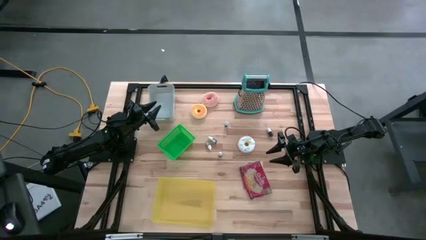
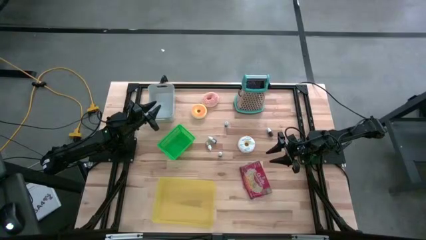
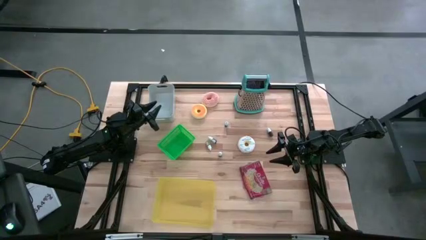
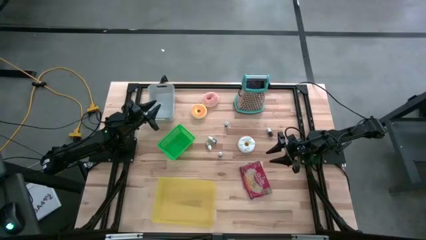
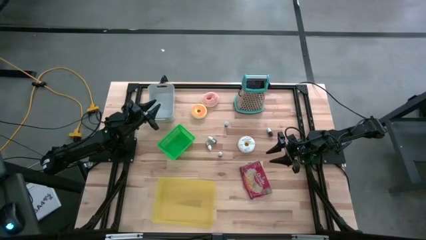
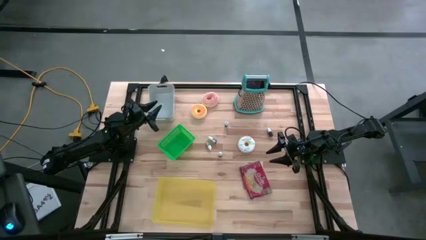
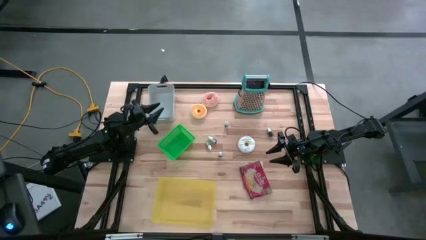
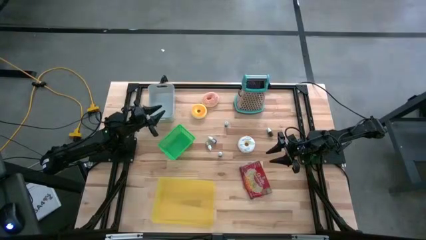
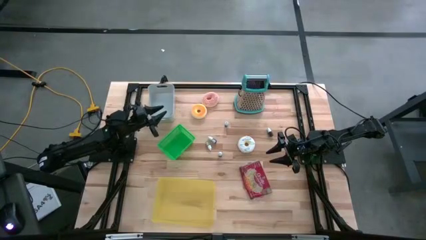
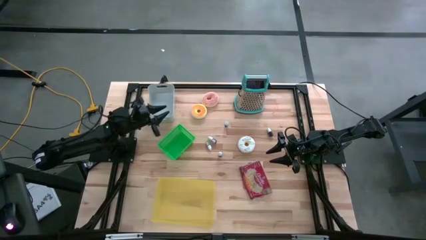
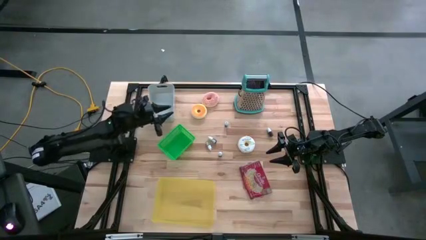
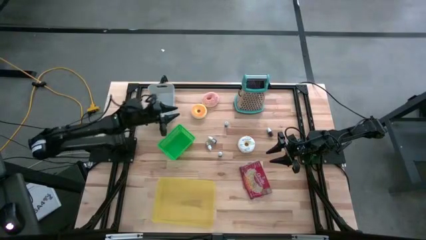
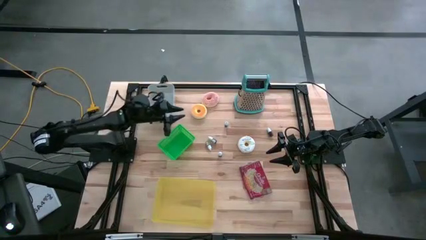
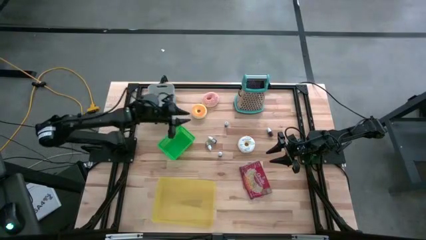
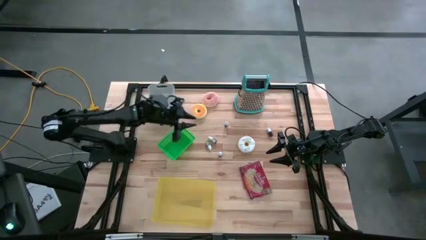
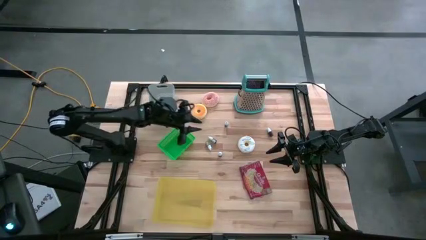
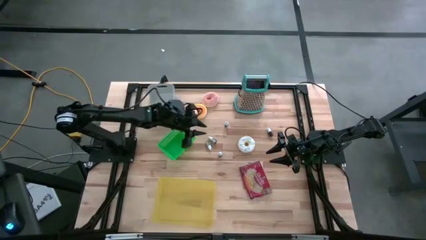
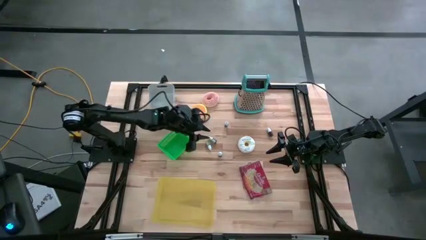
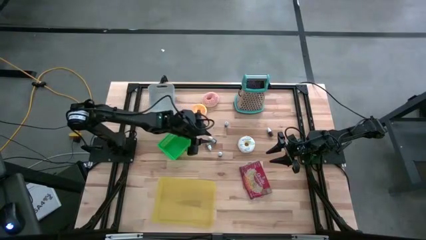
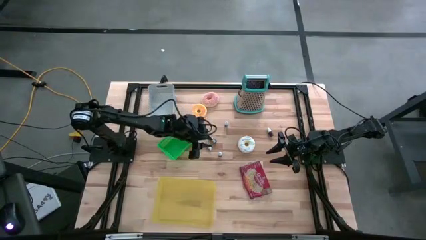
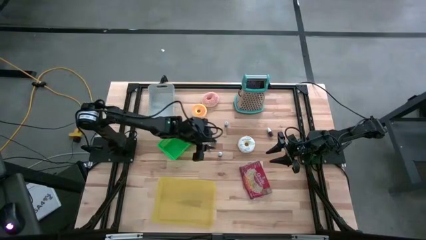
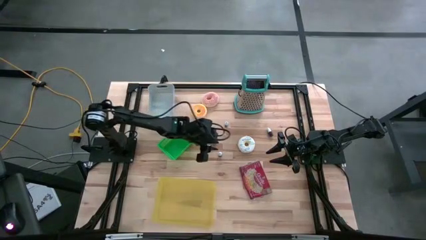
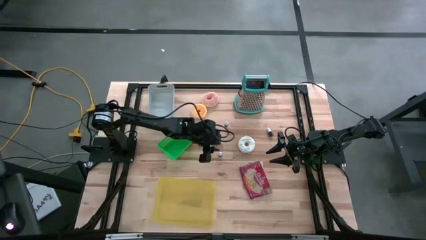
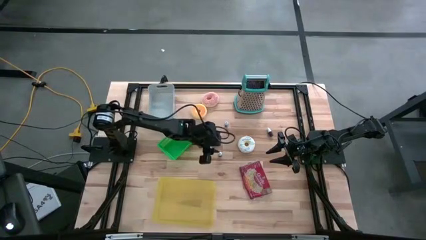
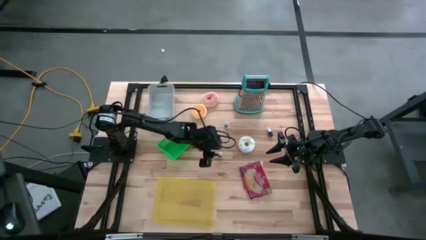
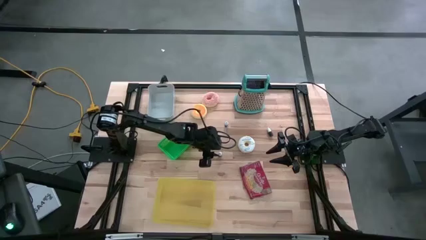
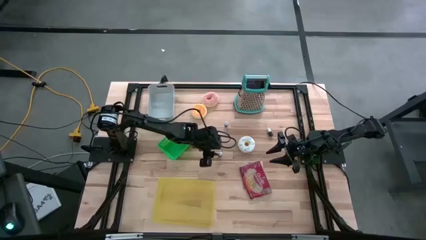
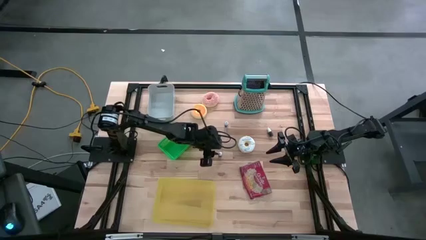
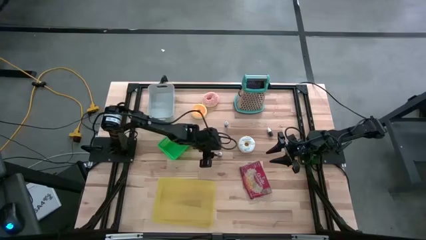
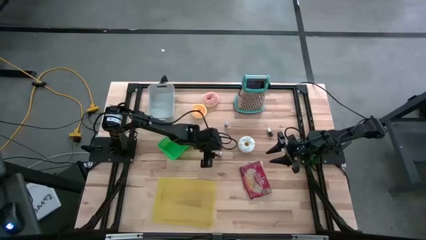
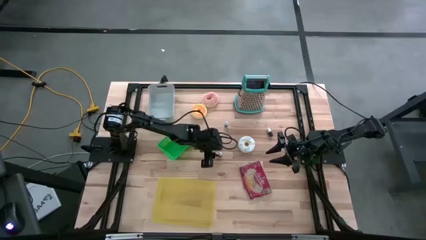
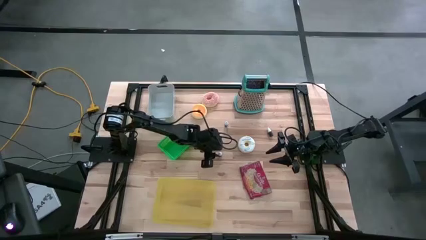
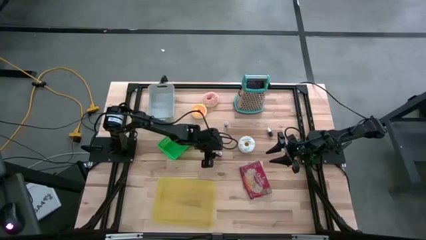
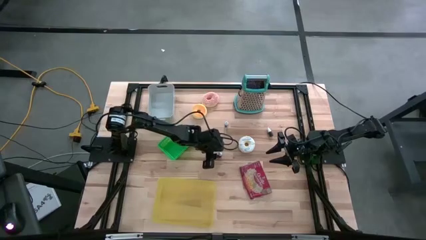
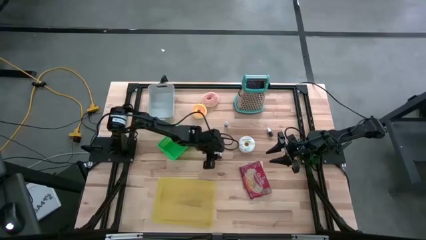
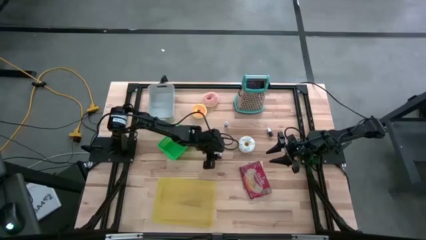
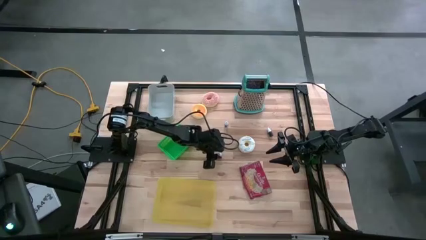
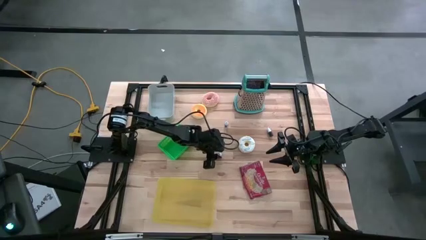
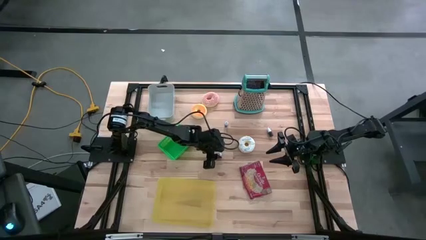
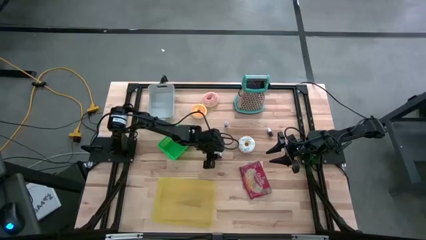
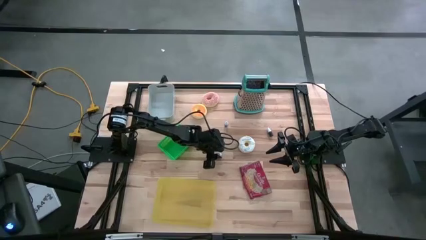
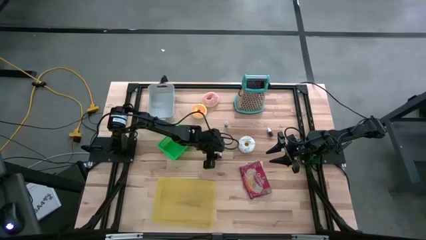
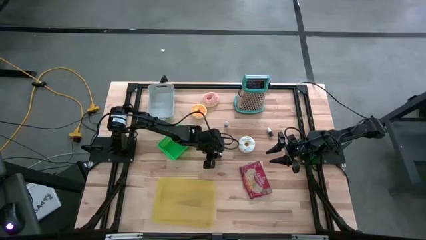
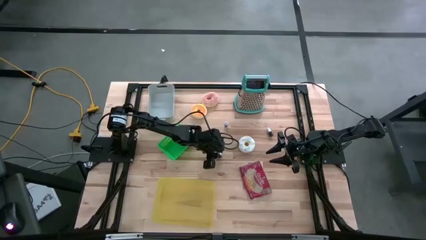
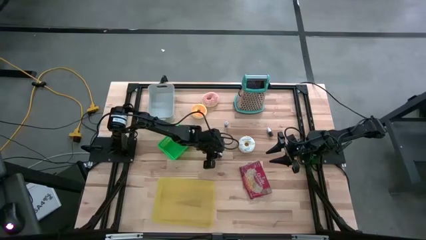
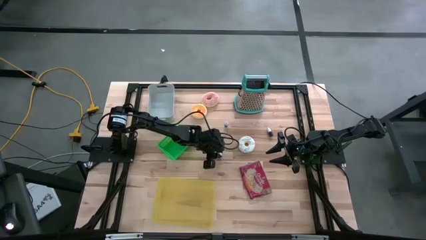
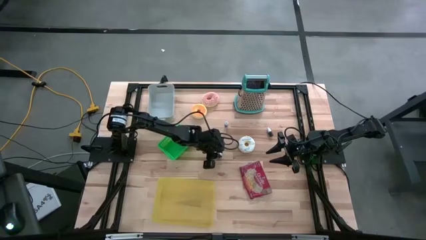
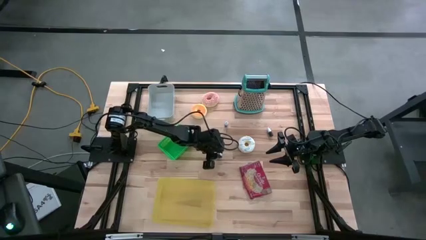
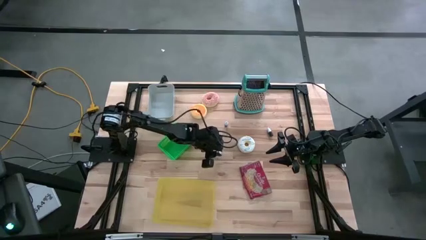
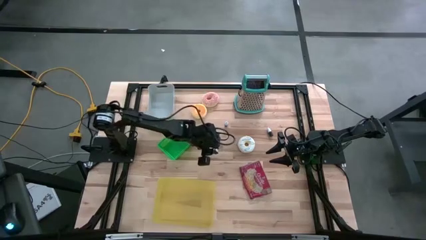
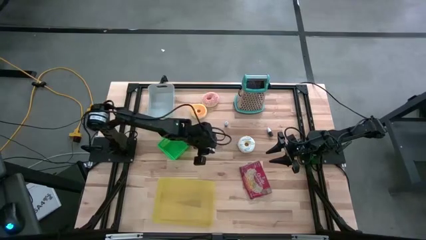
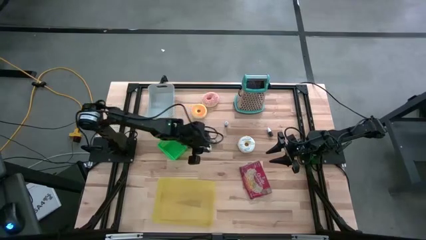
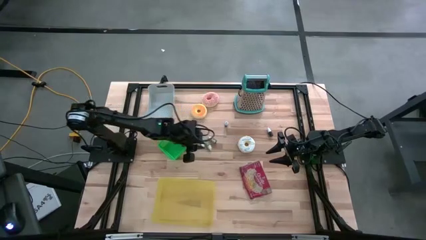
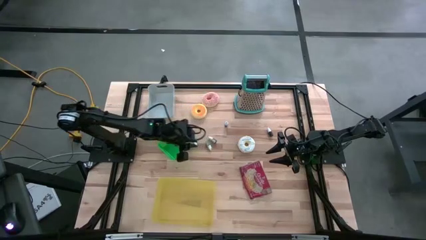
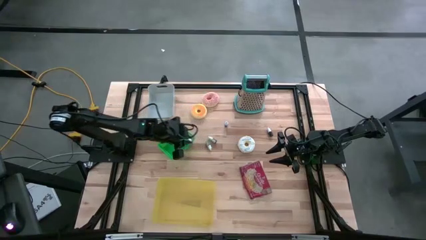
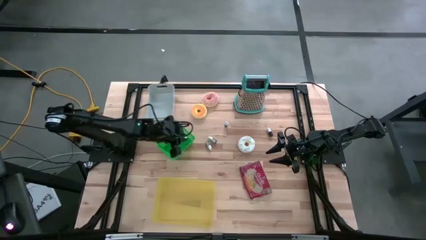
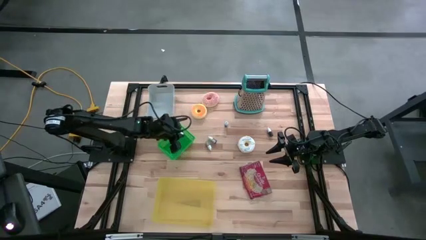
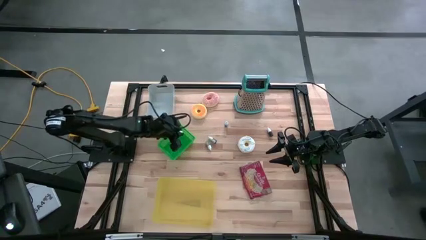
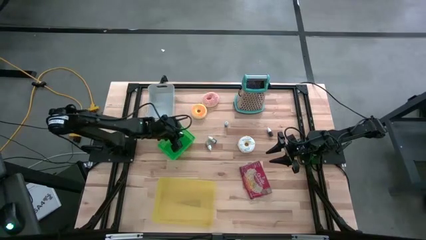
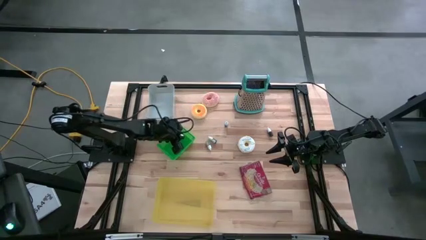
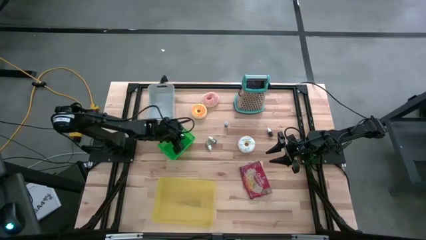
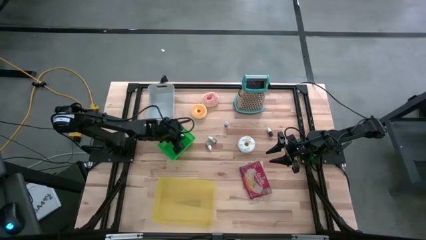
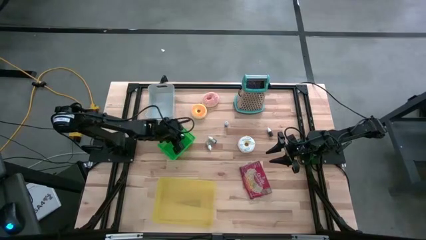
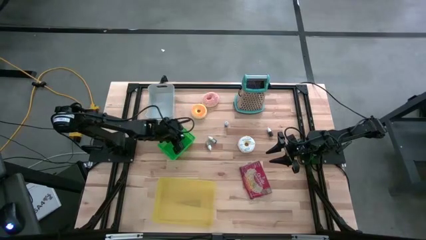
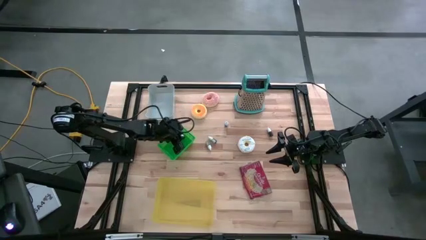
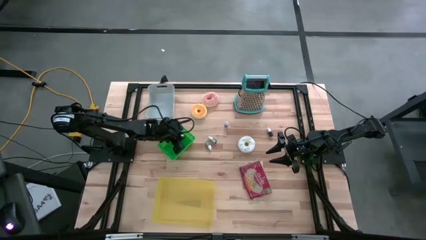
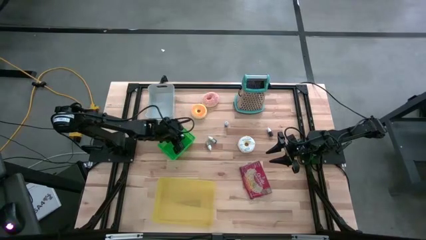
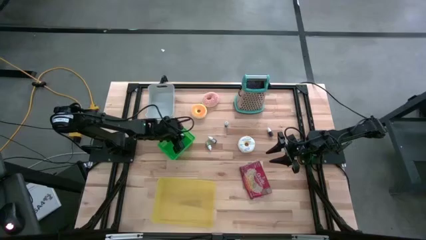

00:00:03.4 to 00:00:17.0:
Put the red bottle into the green basket
